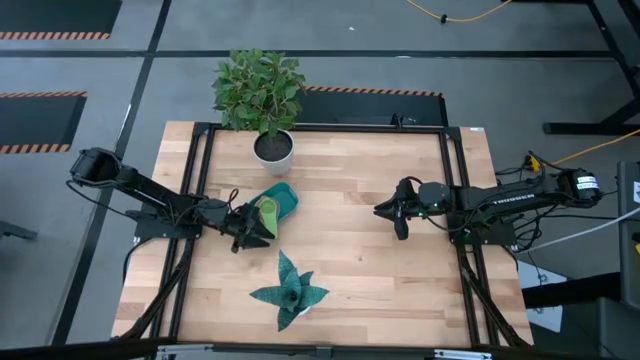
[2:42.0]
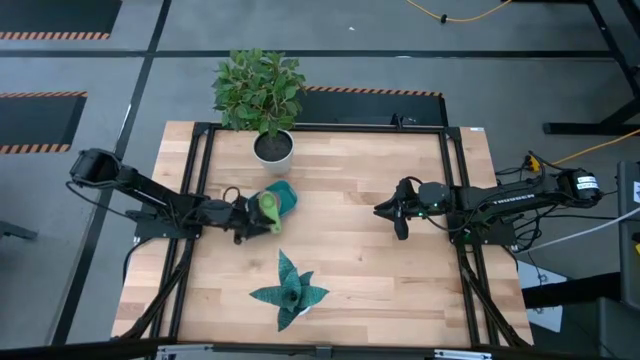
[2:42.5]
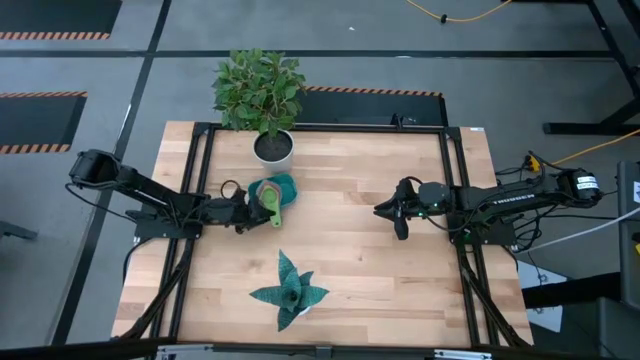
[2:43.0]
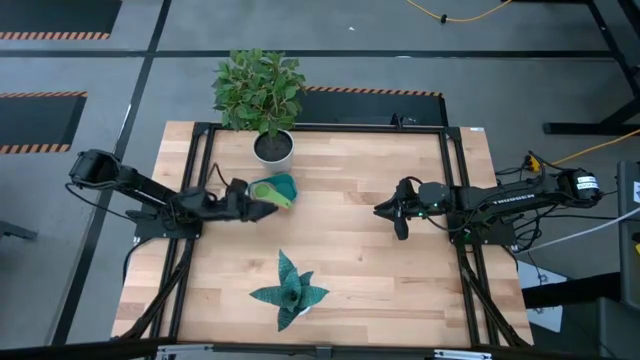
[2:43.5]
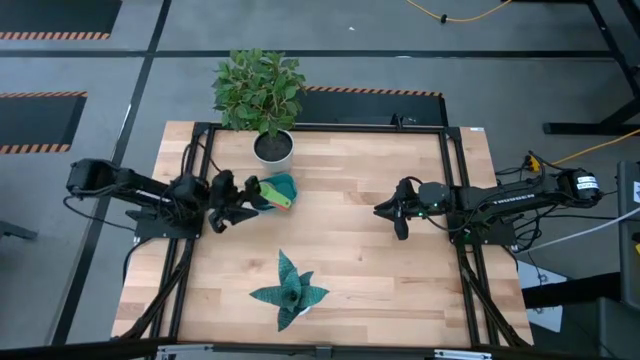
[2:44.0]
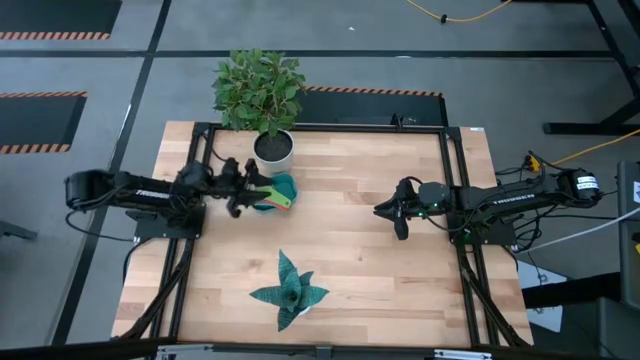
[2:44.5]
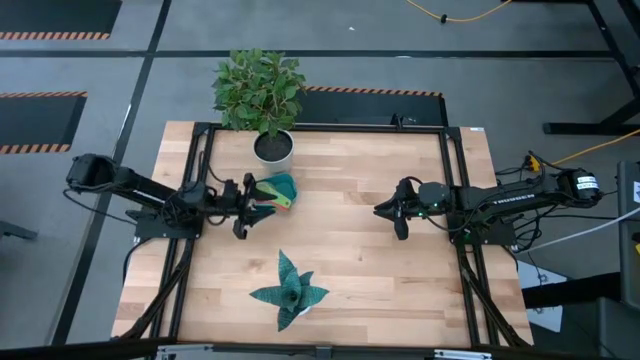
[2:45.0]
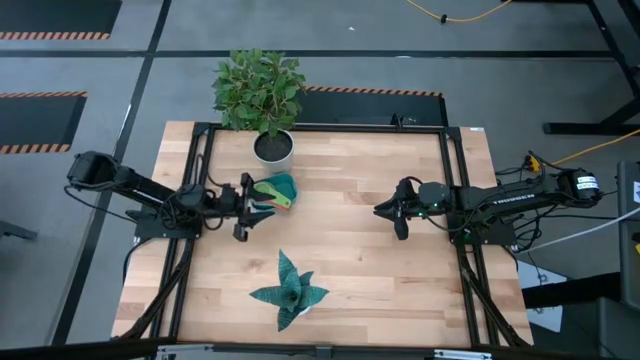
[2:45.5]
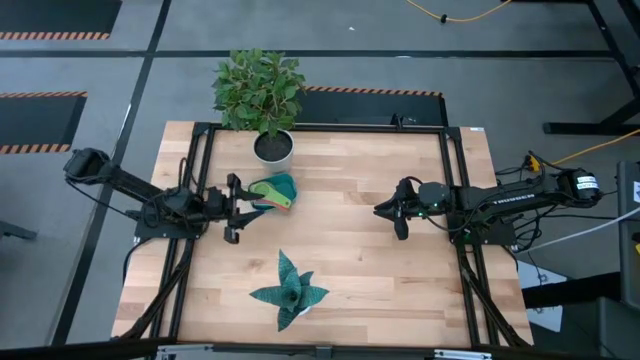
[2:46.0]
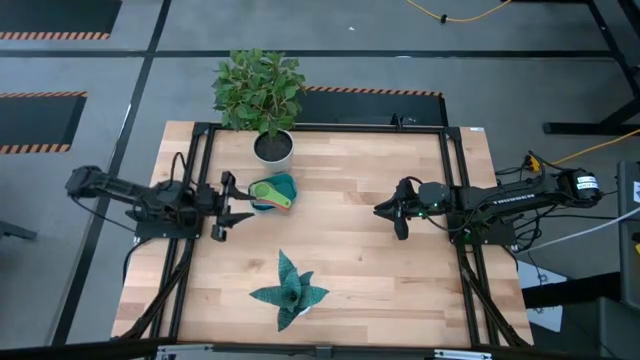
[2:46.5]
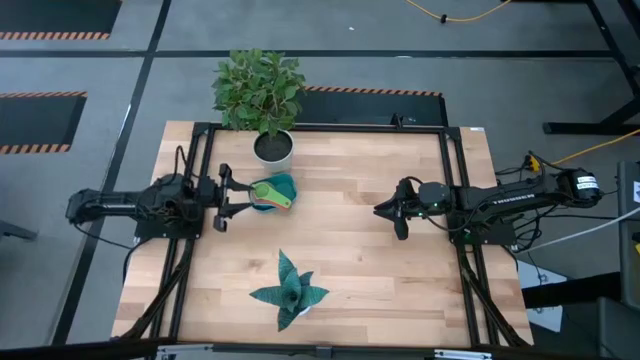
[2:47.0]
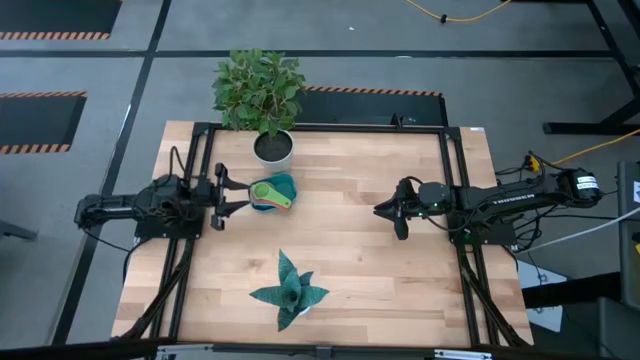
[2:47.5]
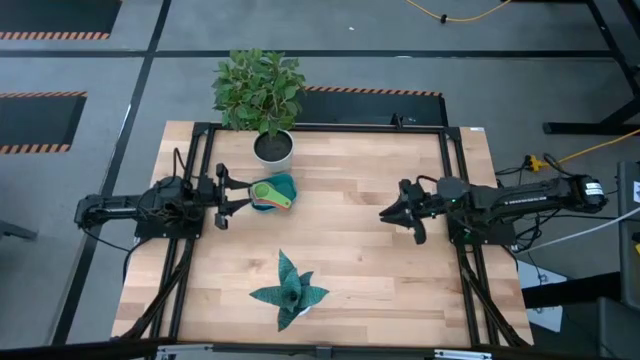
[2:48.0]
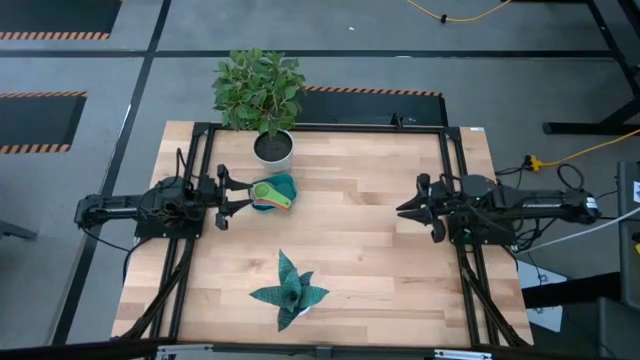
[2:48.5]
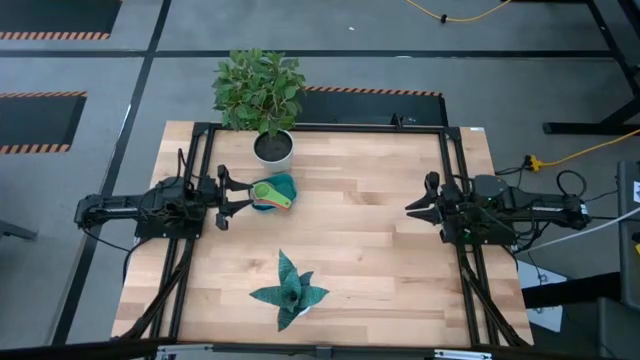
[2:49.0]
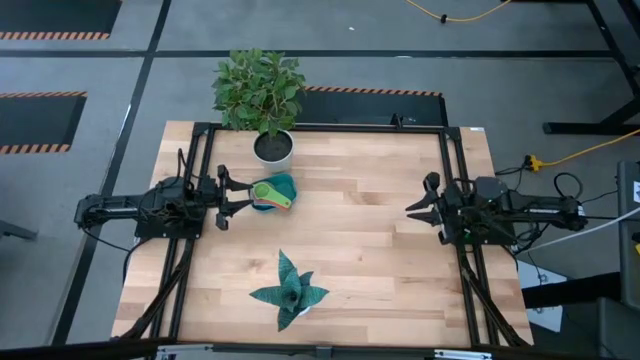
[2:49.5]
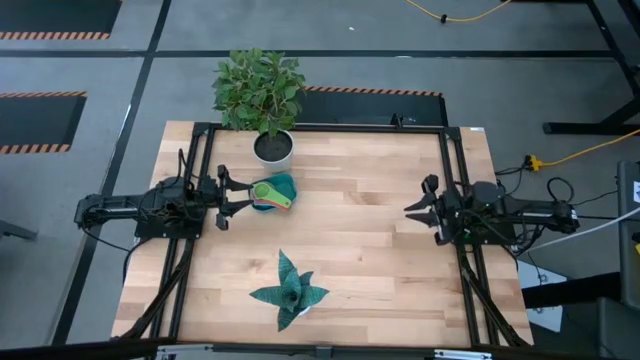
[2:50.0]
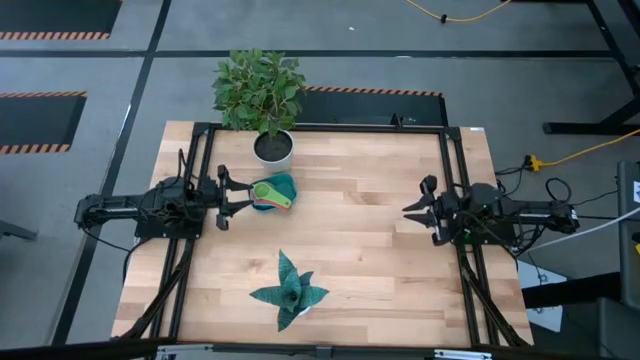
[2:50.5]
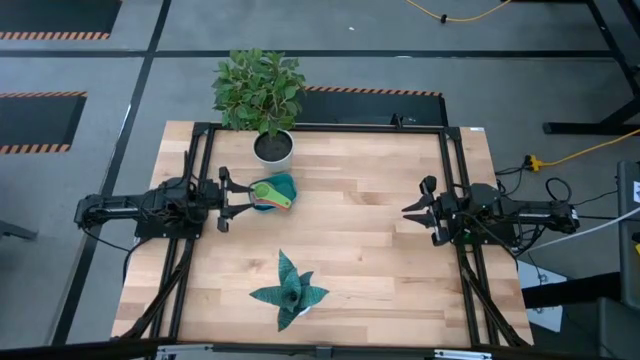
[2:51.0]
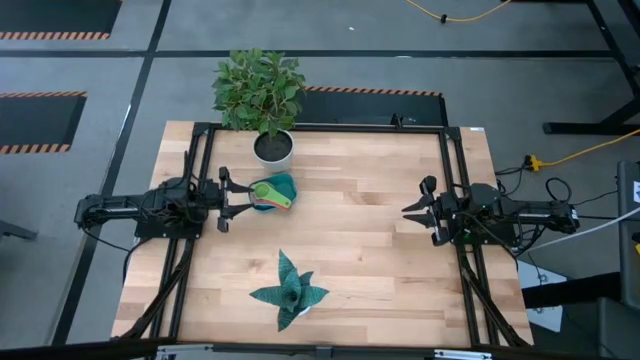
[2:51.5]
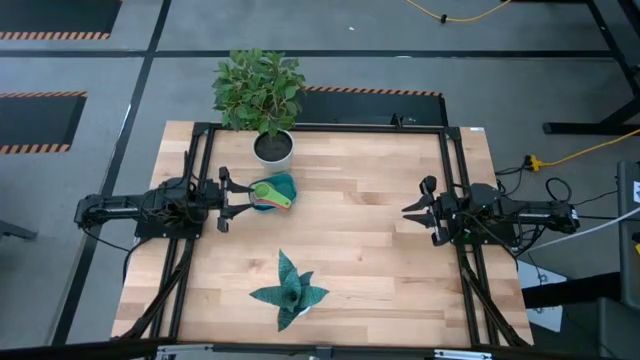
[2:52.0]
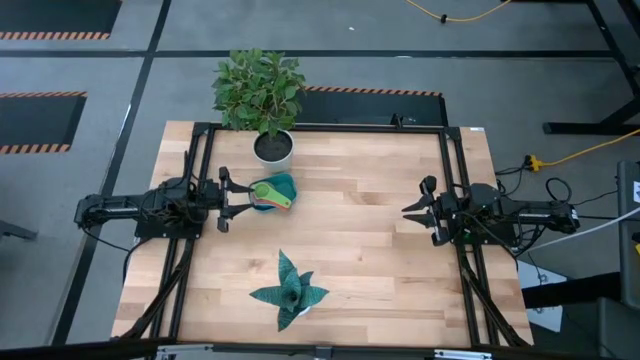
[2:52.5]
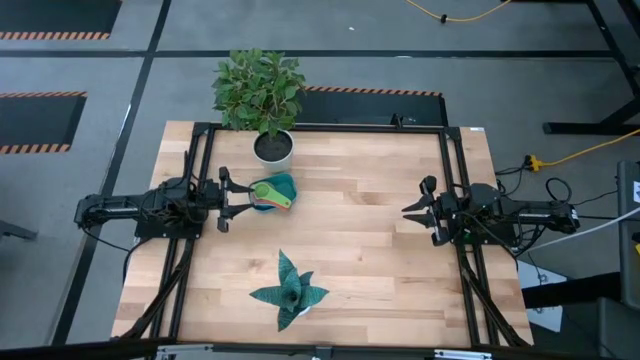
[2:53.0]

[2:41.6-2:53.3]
Task: Nest measuring cups in basket
Return to Home Position

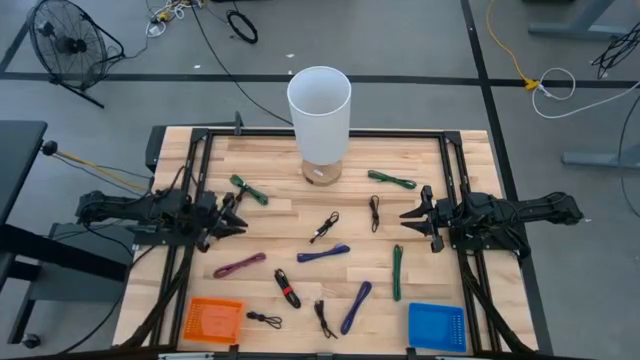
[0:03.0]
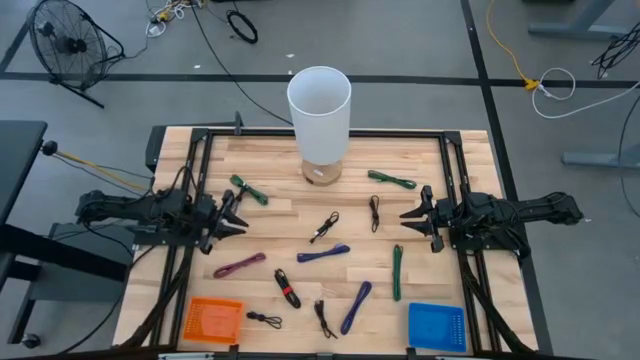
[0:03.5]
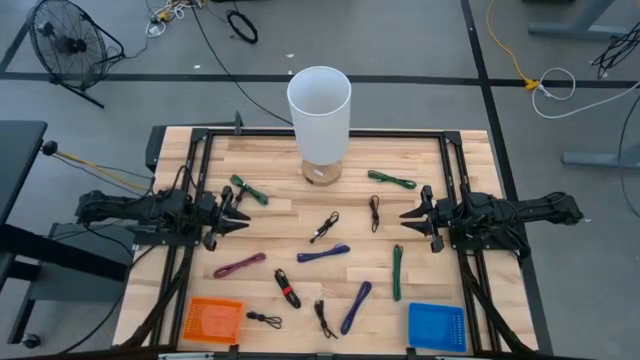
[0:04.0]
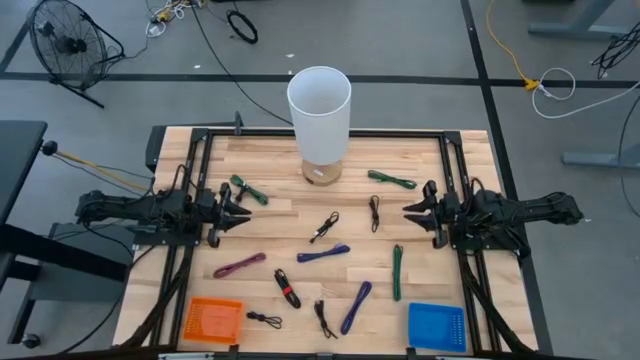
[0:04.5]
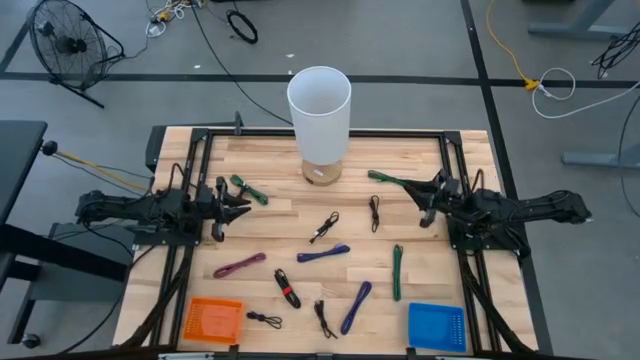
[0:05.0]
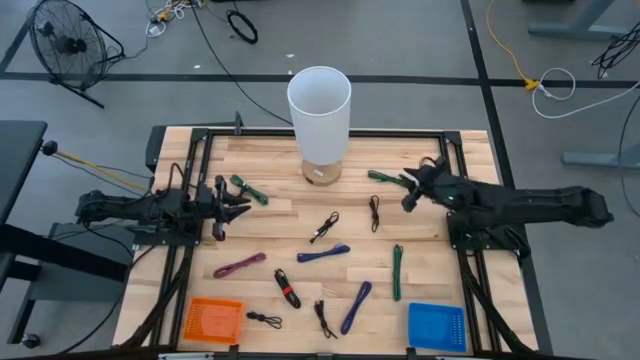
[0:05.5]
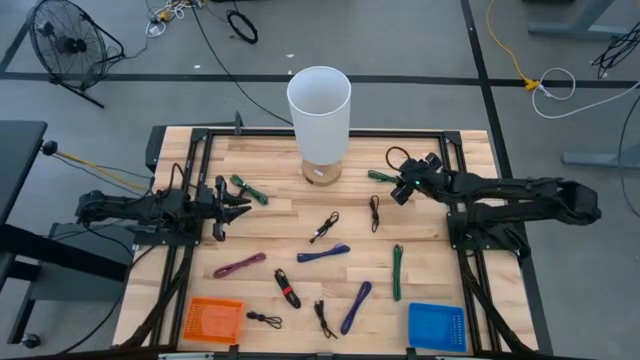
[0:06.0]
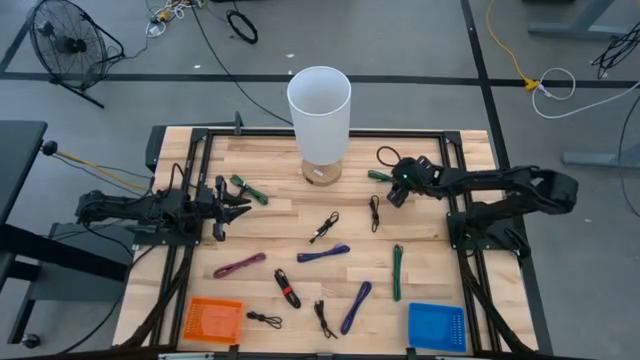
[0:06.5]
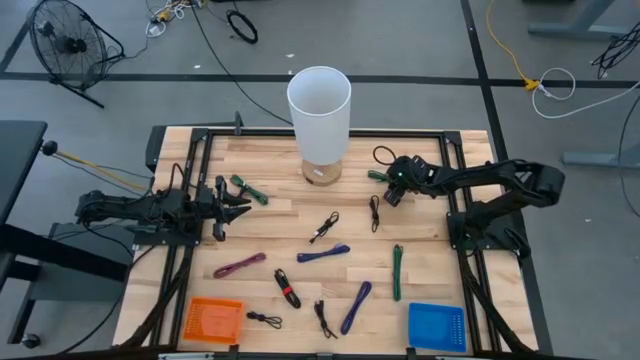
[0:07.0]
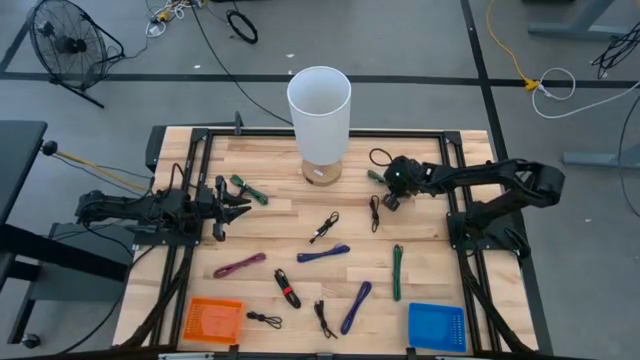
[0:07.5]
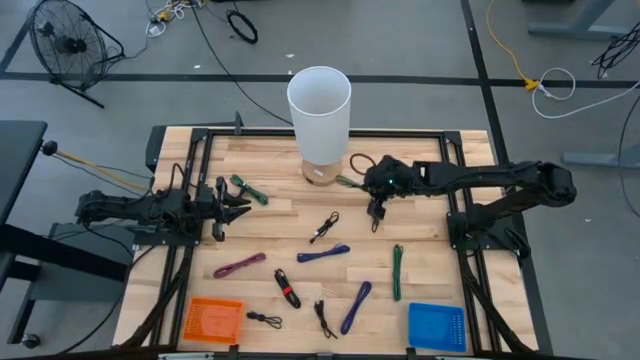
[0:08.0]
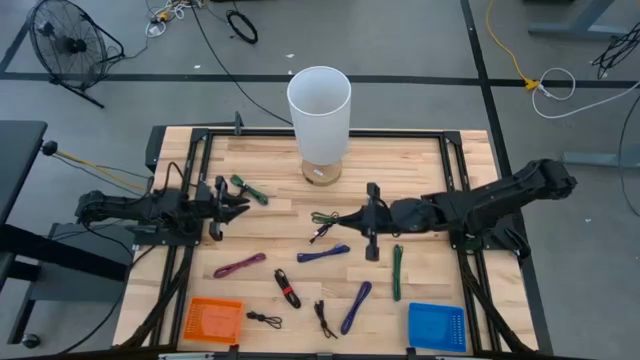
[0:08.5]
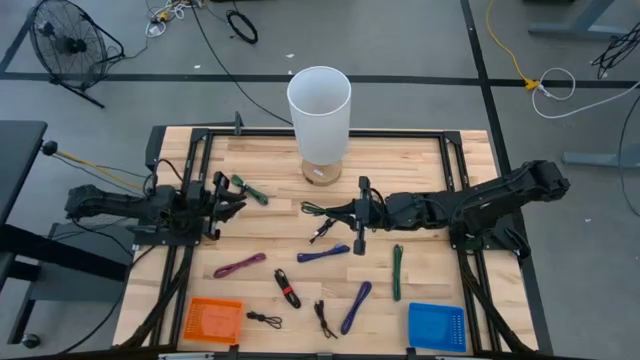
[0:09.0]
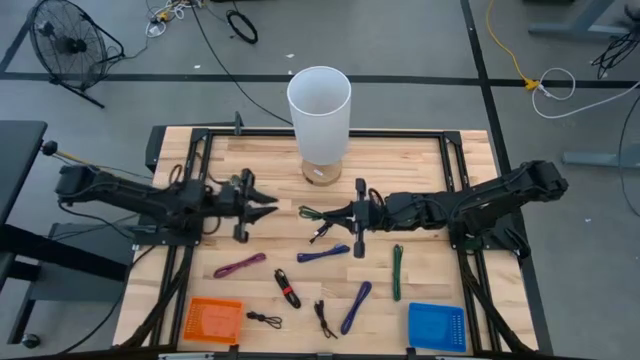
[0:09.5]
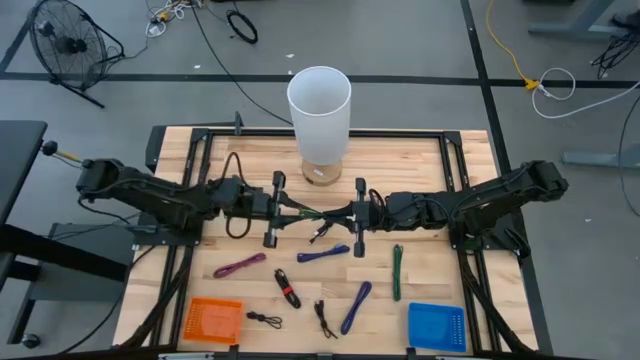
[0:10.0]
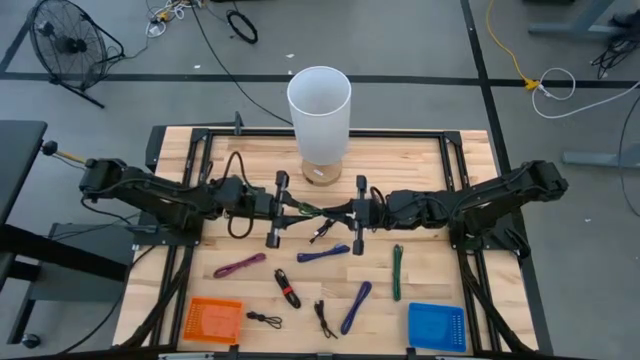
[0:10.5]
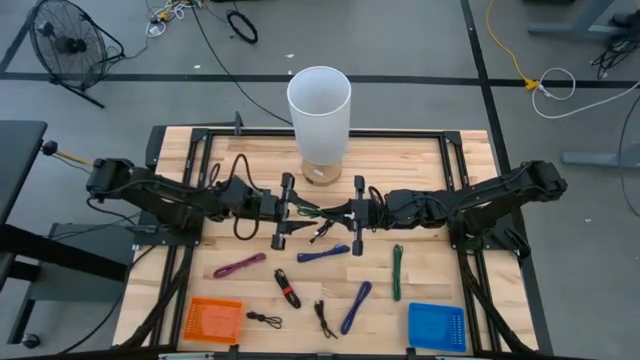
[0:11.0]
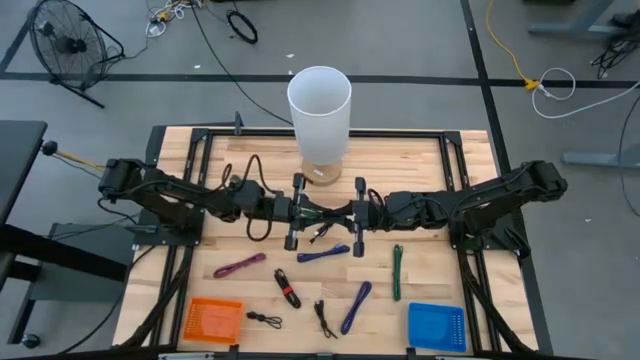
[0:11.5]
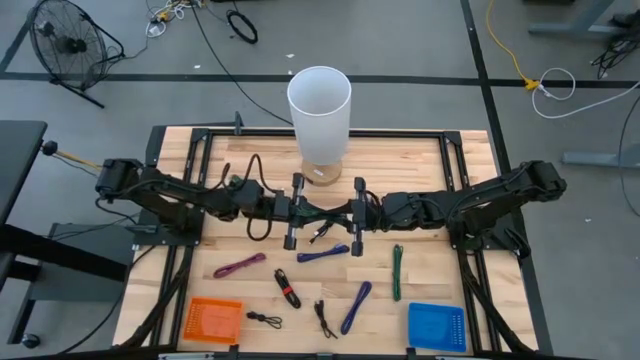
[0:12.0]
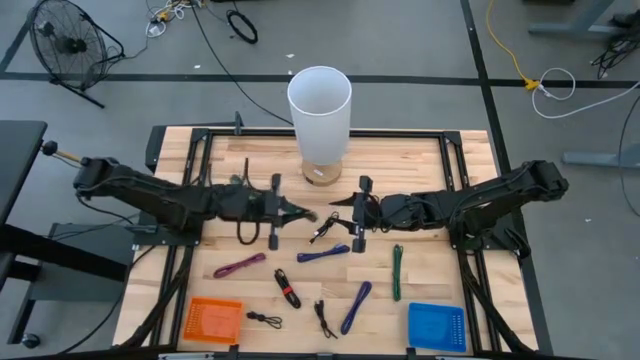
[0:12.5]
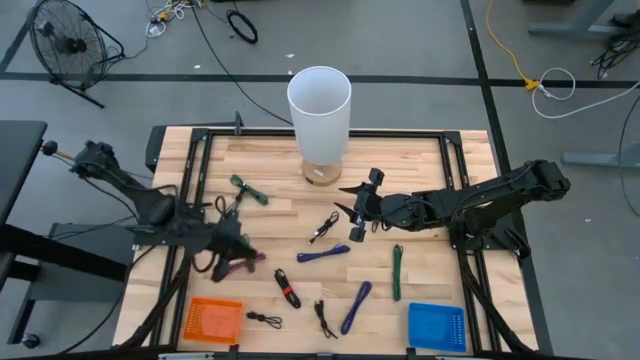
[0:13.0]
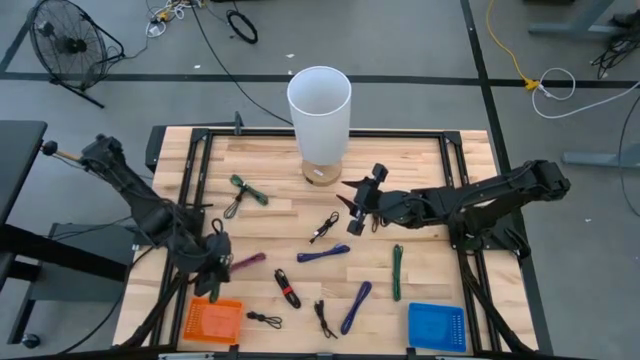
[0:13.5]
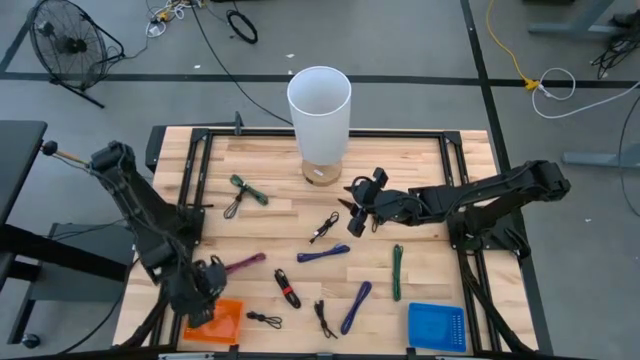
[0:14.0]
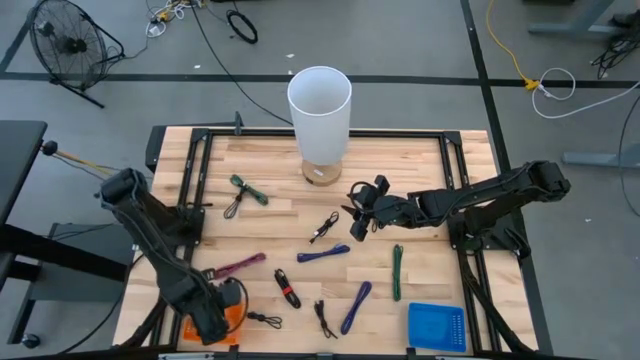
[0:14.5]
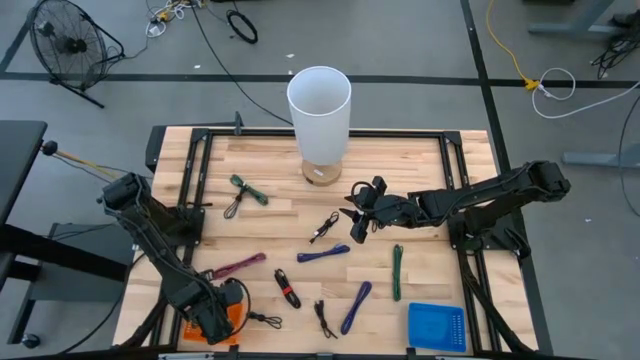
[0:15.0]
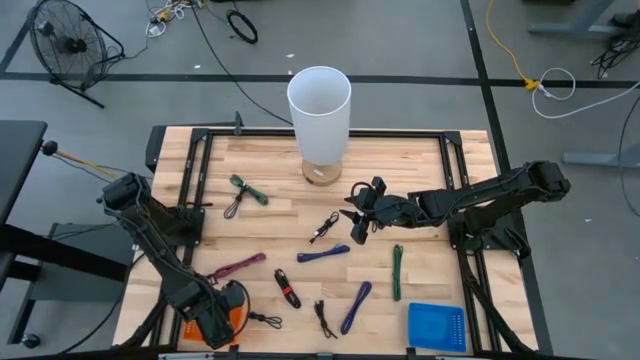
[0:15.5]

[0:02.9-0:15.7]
Task: Pick & Place USB Port
Put the black and green charger cable into the orange bin
